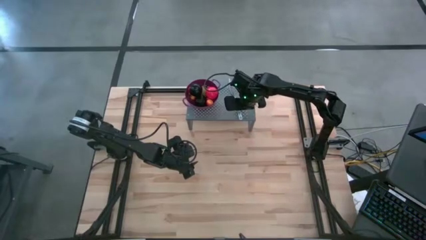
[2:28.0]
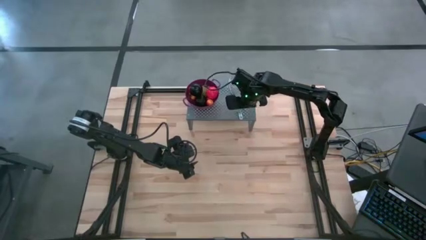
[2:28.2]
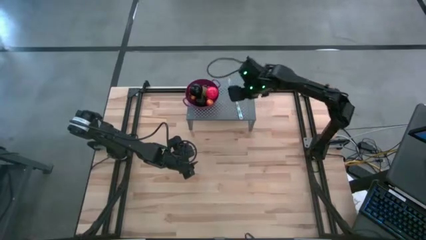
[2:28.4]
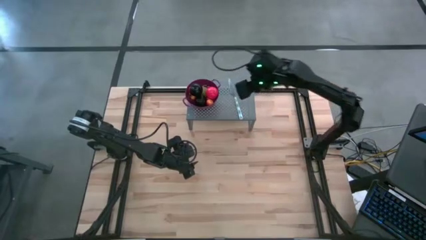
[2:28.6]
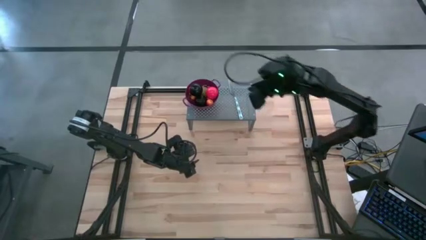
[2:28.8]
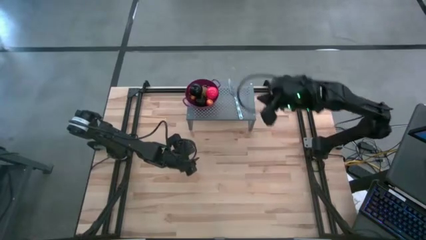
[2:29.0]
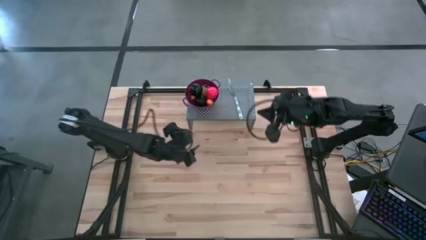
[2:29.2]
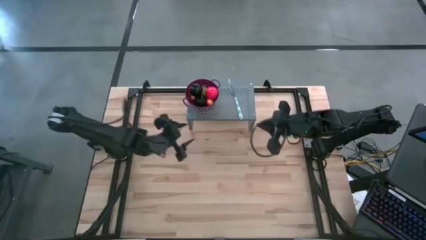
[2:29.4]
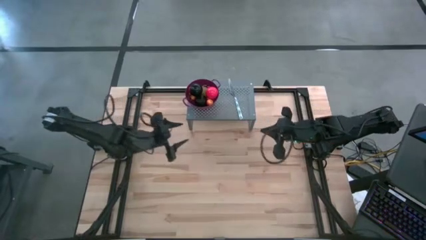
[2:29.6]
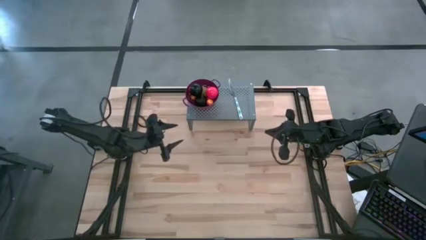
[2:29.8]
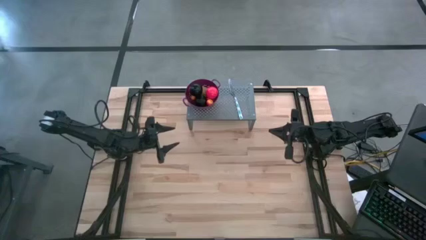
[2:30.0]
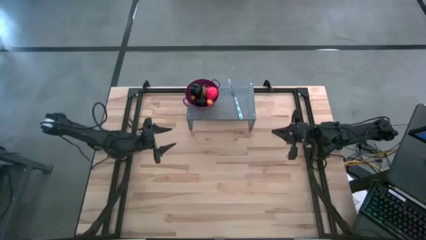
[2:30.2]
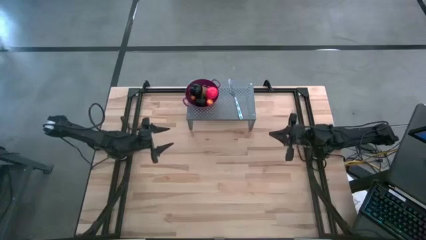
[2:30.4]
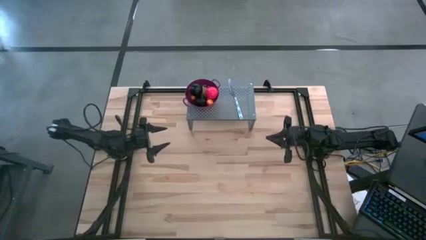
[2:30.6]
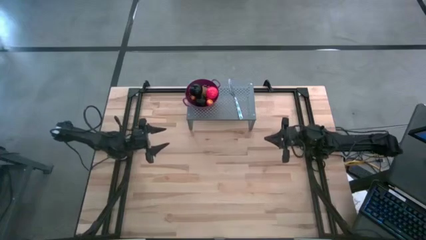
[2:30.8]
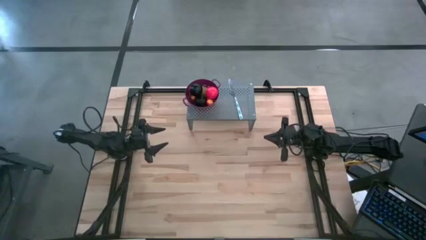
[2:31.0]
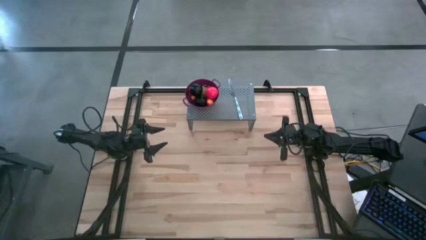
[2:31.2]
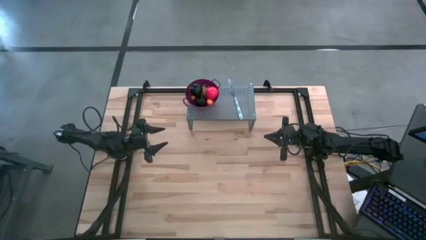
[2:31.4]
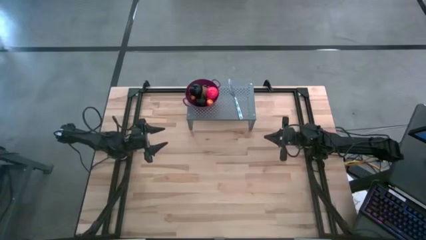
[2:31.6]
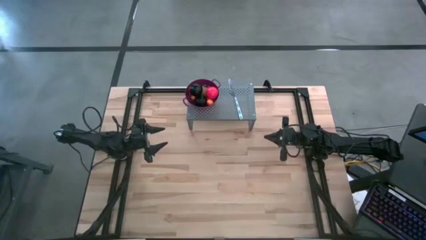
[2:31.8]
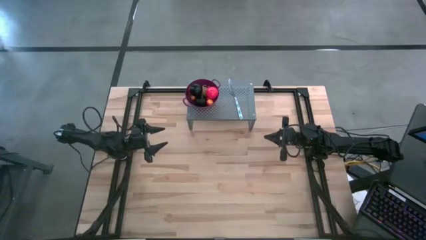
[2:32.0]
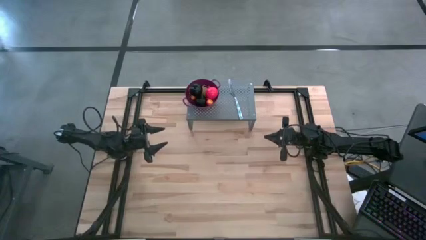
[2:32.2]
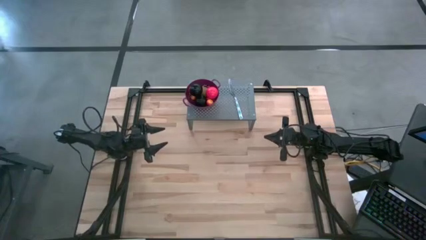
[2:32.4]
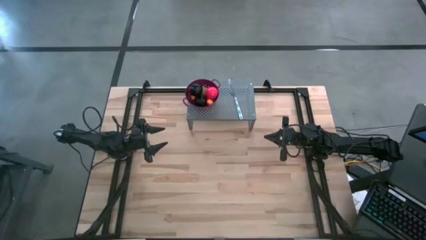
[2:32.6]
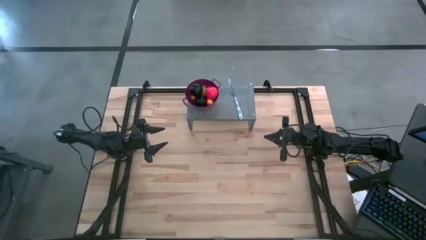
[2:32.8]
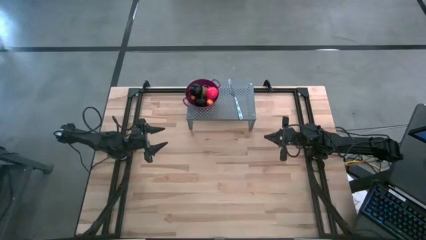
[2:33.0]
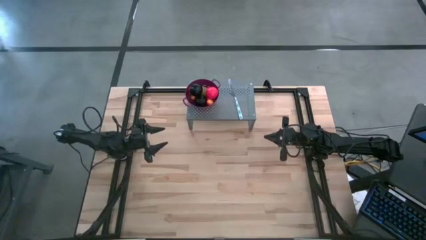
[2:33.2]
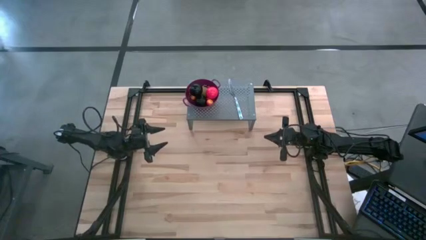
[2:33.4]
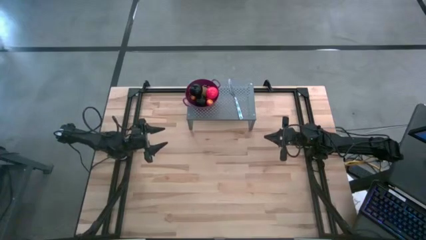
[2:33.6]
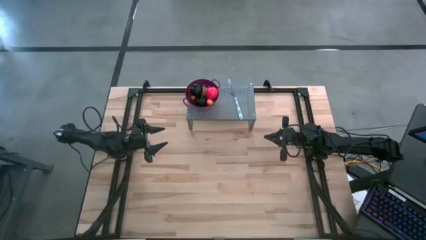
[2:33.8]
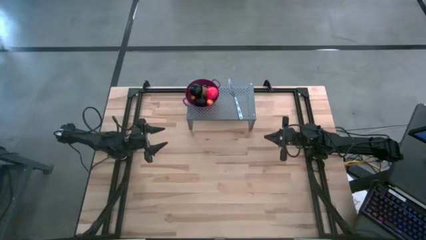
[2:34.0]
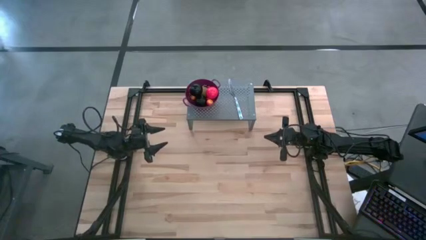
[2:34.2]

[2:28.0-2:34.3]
Task: Pick & Place Fruit
Return to Home Position

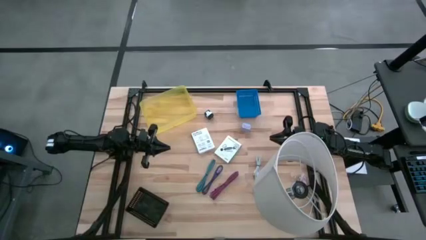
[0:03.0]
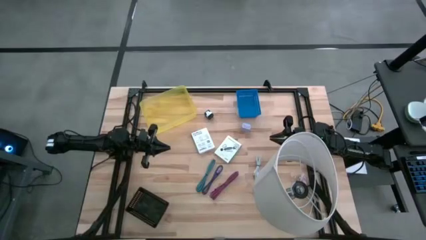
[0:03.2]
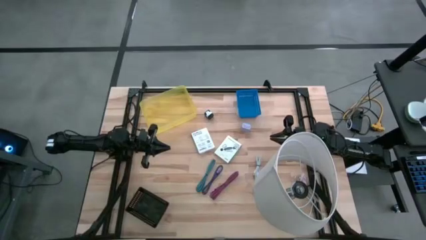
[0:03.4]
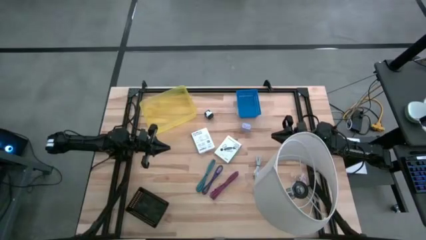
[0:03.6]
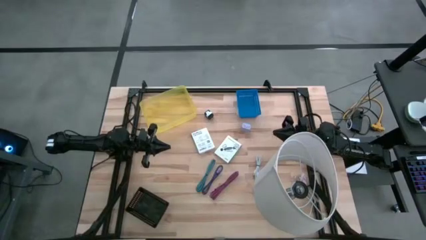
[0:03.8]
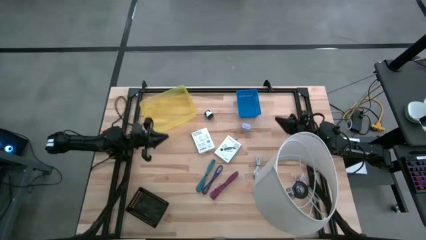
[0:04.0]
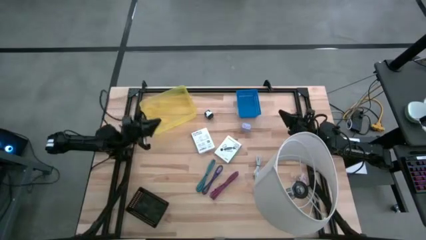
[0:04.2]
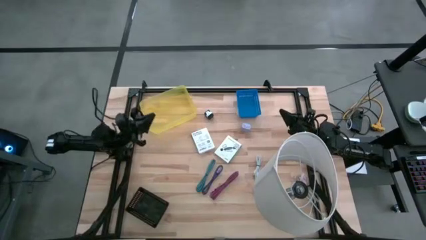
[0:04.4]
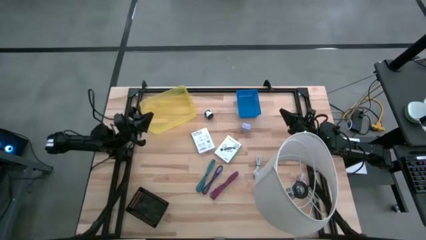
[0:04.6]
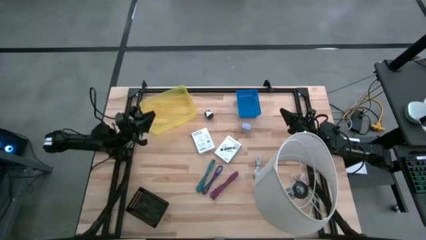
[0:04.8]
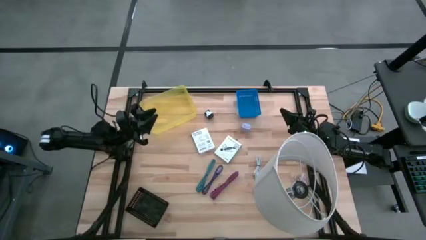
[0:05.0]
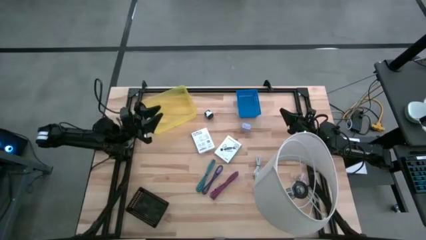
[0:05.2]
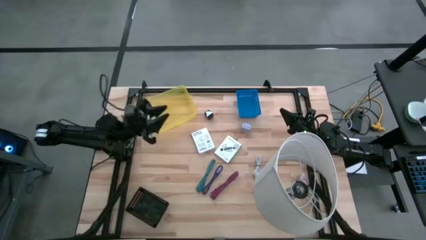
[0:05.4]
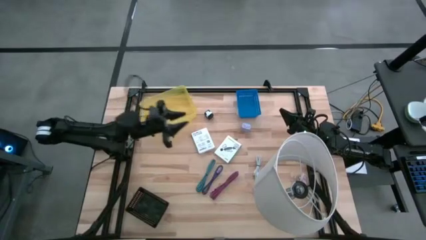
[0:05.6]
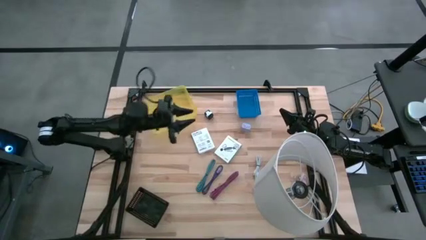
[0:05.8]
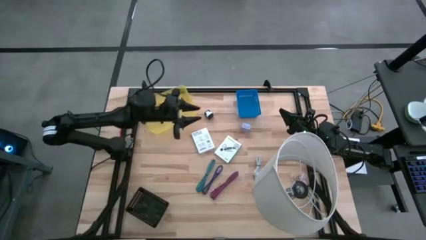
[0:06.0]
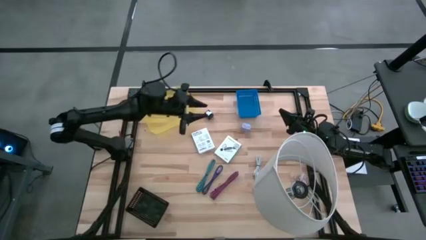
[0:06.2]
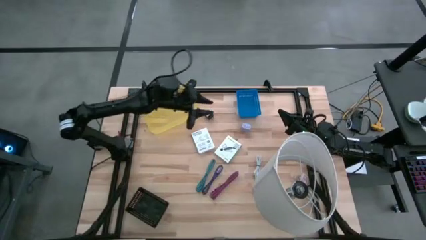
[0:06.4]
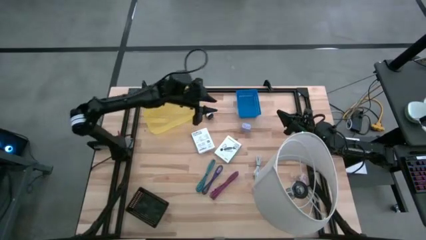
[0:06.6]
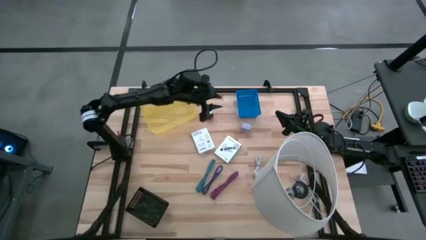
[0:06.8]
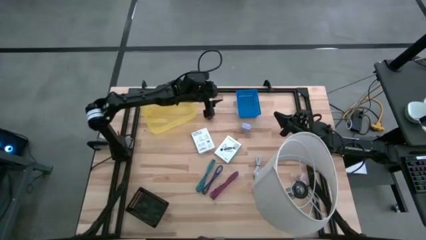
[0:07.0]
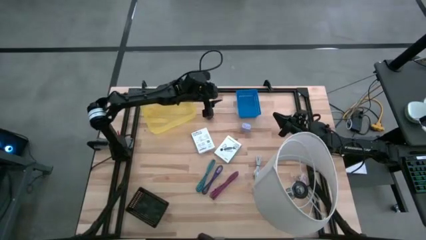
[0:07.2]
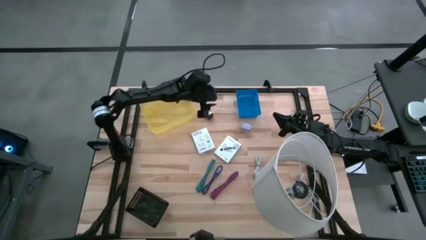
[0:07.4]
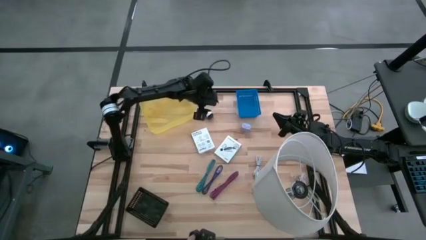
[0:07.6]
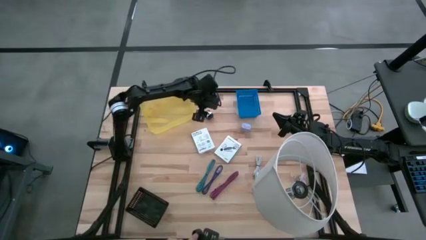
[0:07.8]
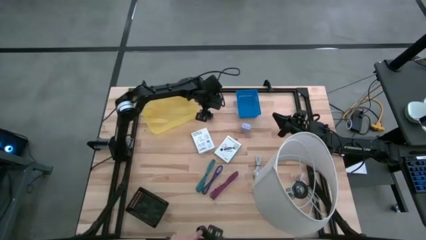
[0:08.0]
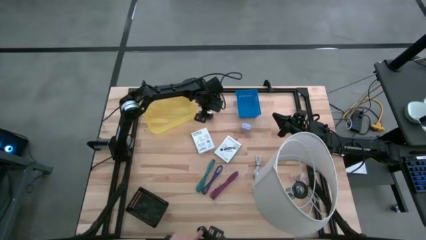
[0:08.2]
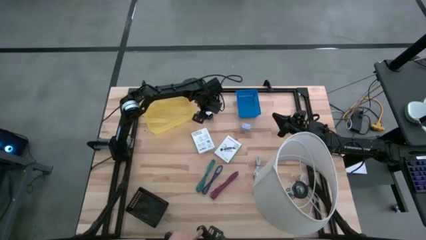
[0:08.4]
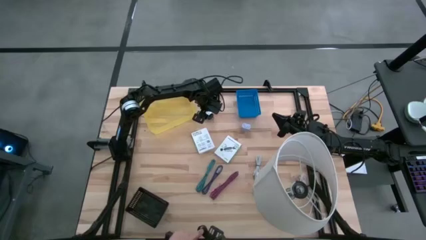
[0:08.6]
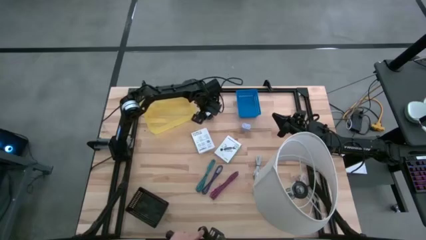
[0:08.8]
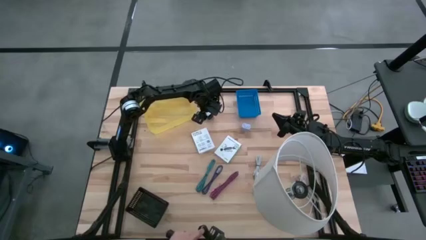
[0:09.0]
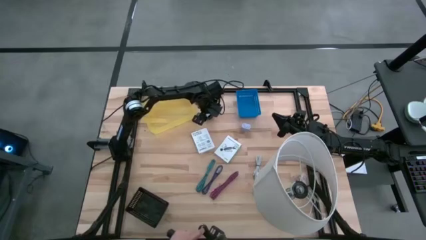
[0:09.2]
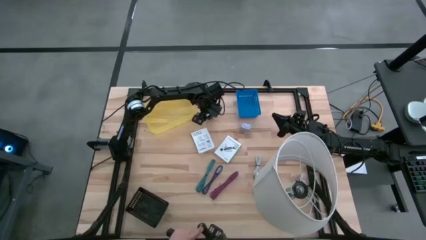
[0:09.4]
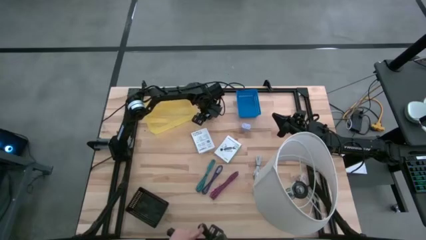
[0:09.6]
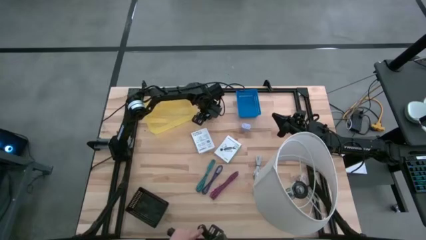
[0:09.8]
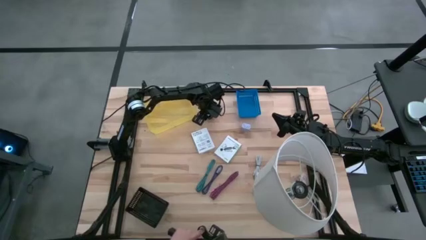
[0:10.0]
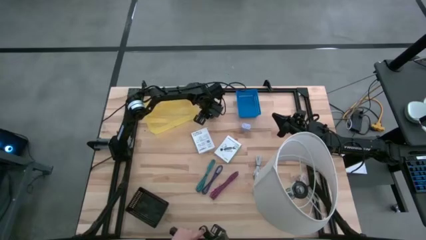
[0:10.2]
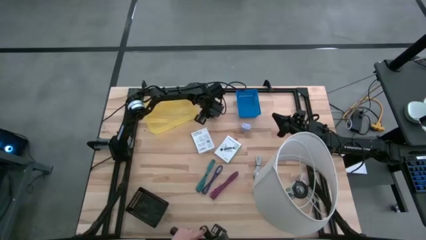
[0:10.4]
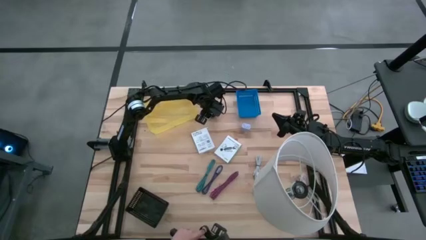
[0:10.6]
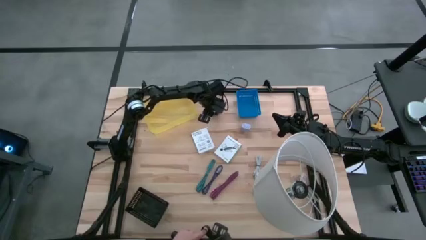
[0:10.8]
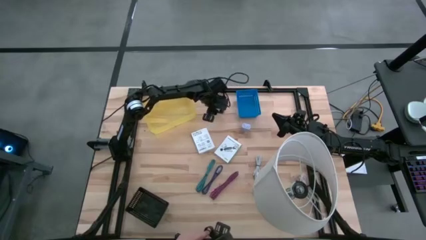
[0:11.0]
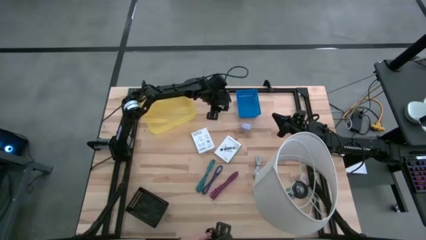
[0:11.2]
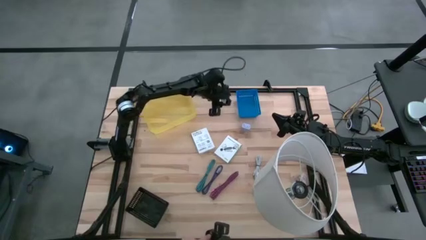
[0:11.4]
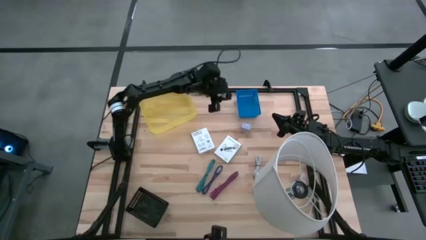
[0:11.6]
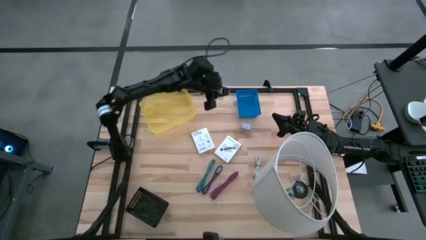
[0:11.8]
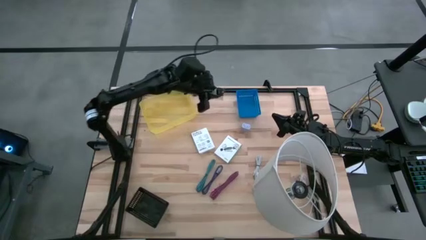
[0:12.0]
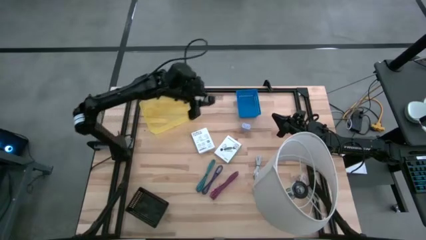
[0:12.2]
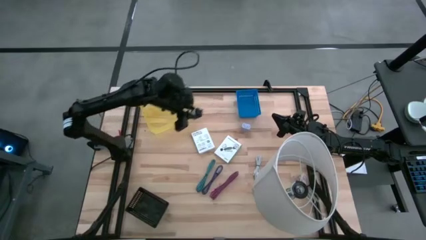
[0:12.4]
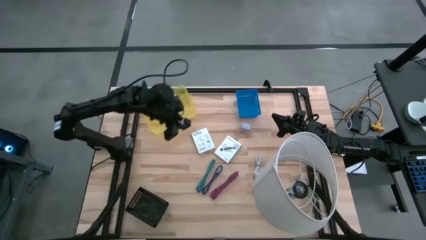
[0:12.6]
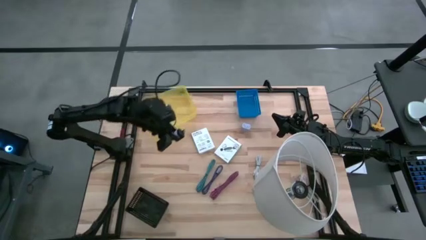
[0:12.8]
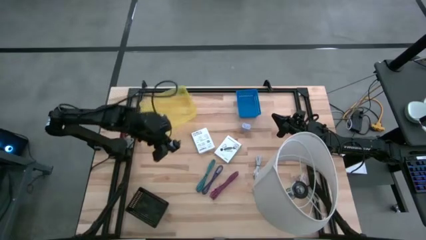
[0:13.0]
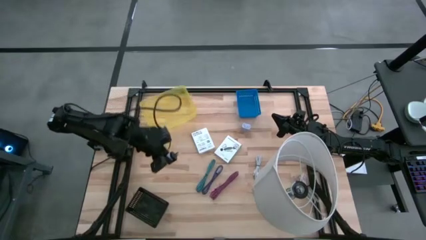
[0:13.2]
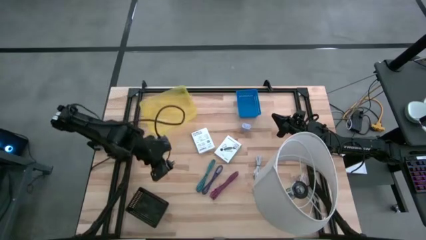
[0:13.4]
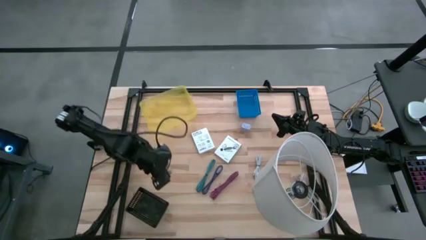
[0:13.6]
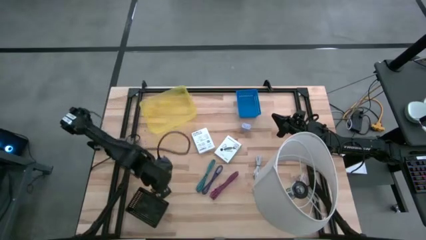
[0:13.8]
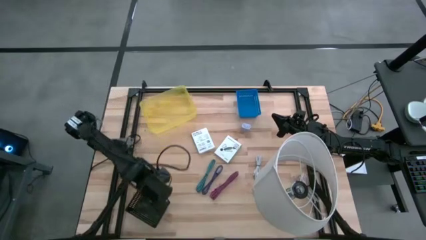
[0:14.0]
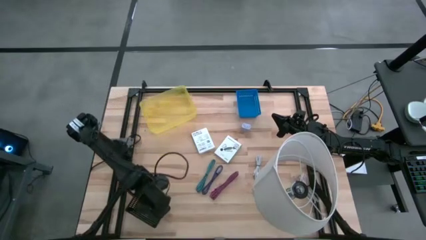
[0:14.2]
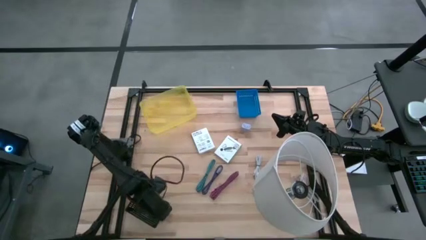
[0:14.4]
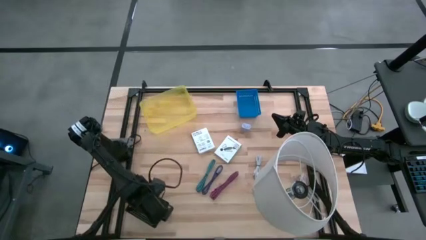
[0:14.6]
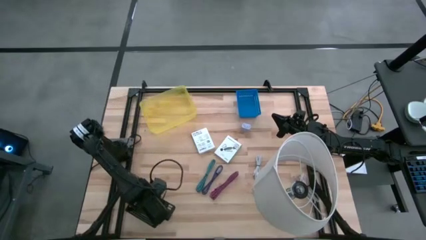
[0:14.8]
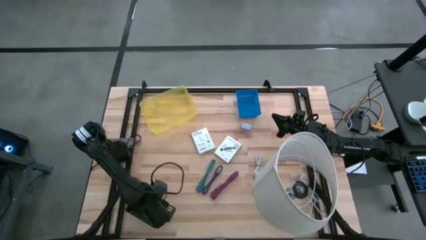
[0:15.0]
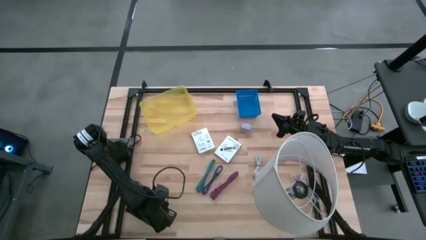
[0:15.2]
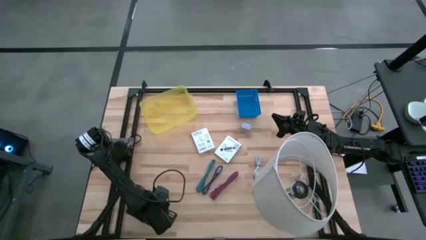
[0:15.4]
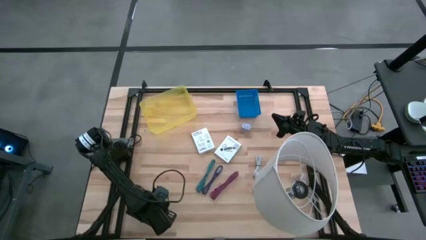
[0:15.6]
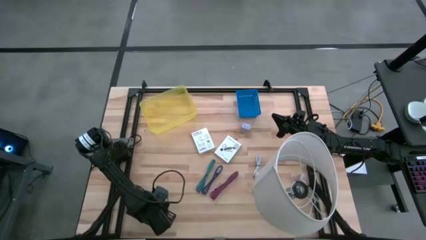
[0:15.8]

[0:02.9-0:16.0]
Task: Pick and place items into bin
Put the black charger adapter into the black bin
